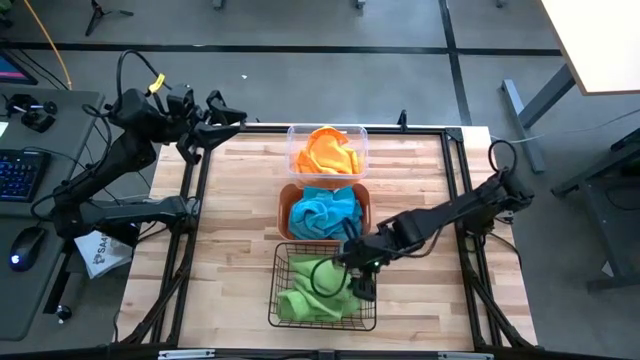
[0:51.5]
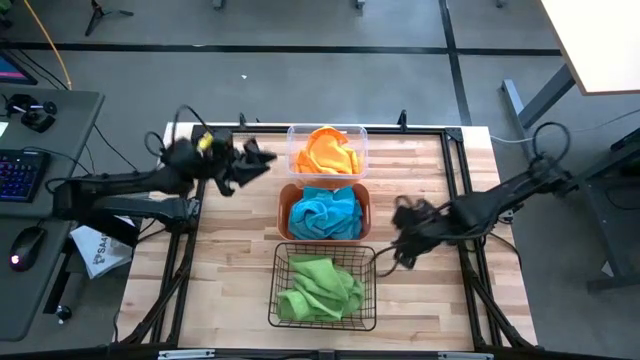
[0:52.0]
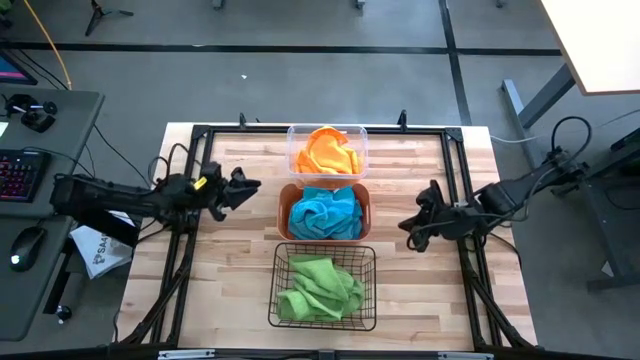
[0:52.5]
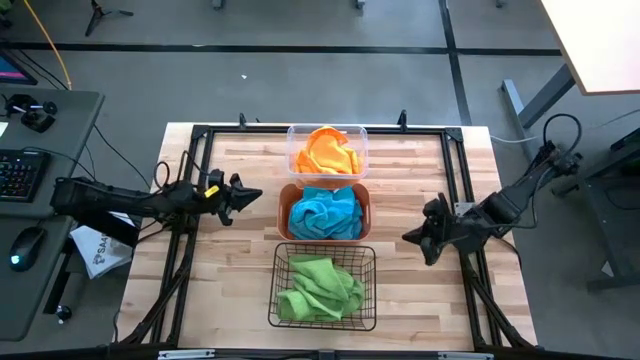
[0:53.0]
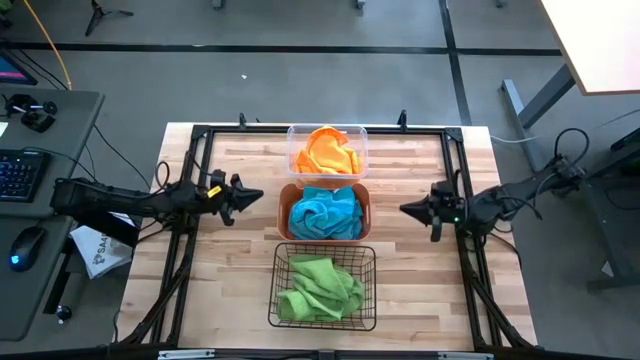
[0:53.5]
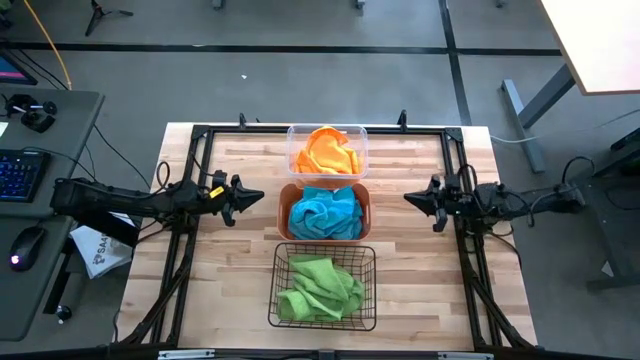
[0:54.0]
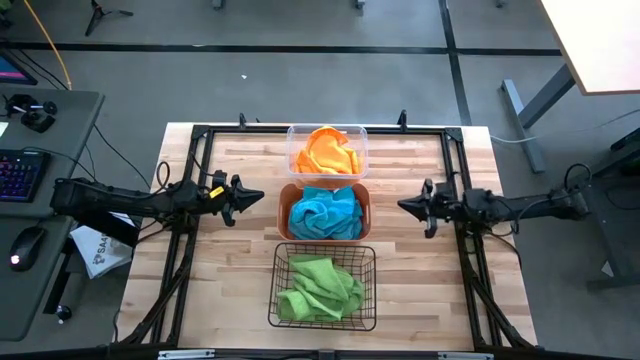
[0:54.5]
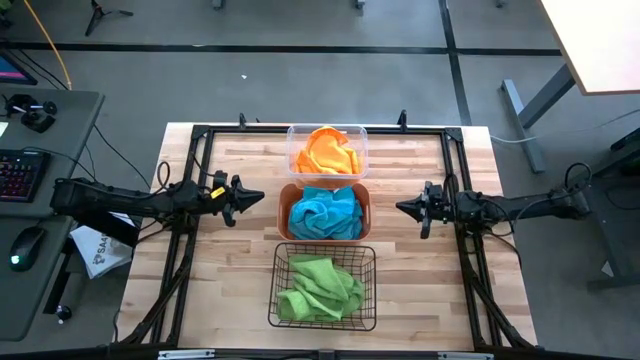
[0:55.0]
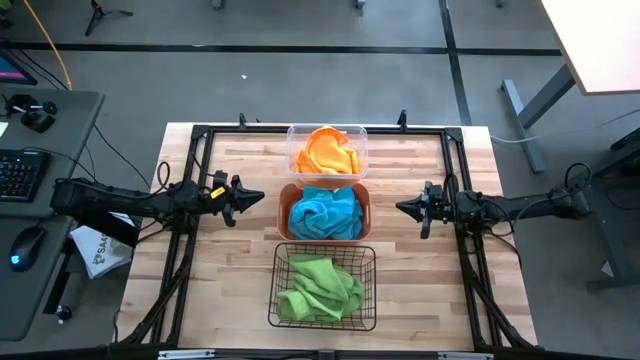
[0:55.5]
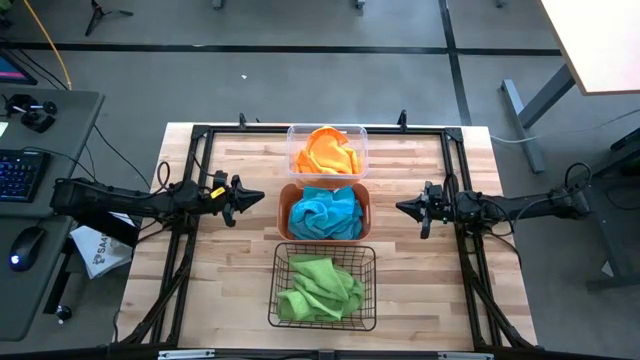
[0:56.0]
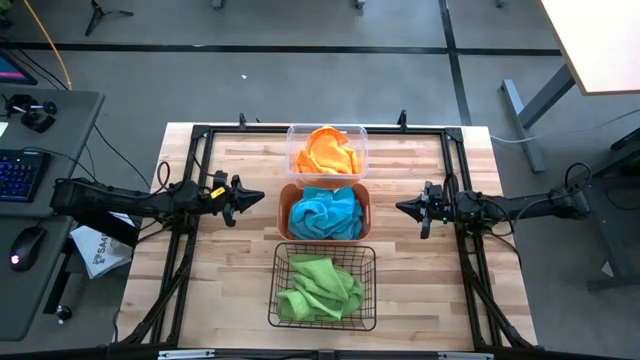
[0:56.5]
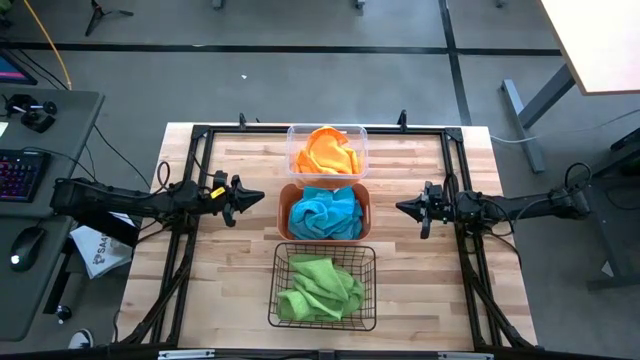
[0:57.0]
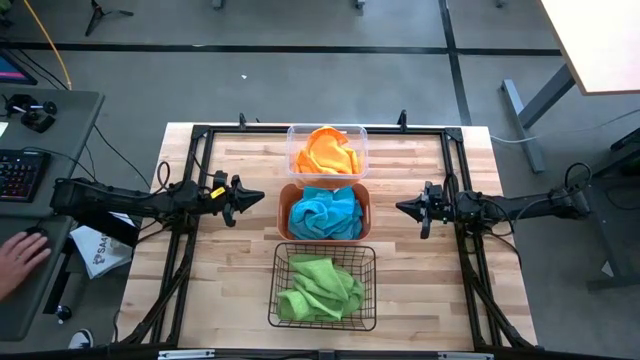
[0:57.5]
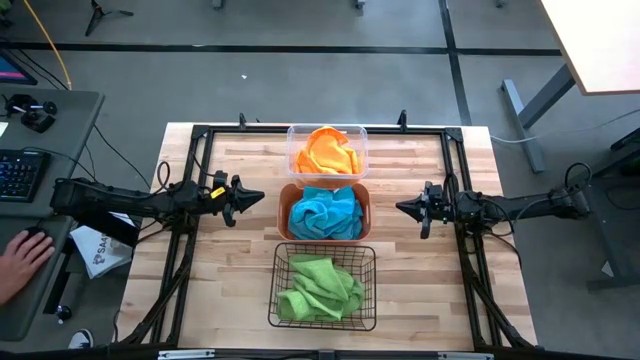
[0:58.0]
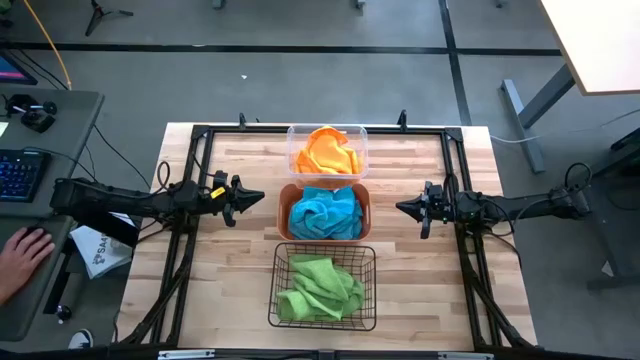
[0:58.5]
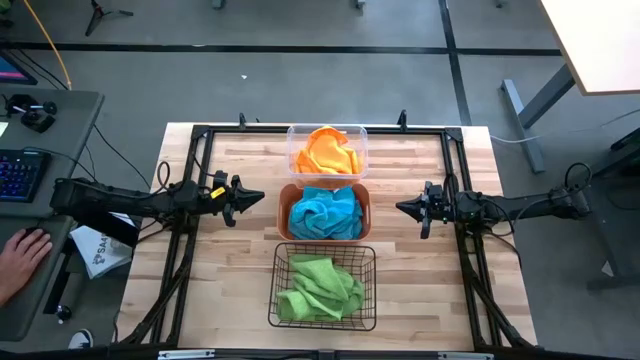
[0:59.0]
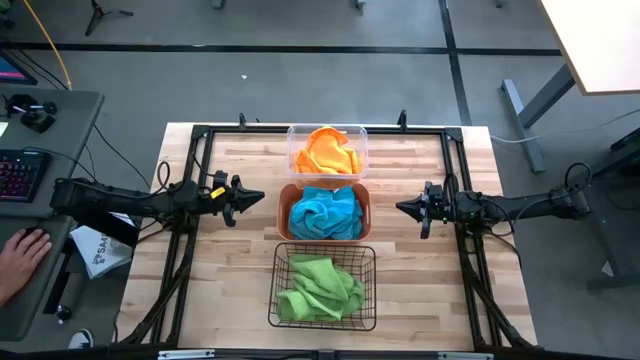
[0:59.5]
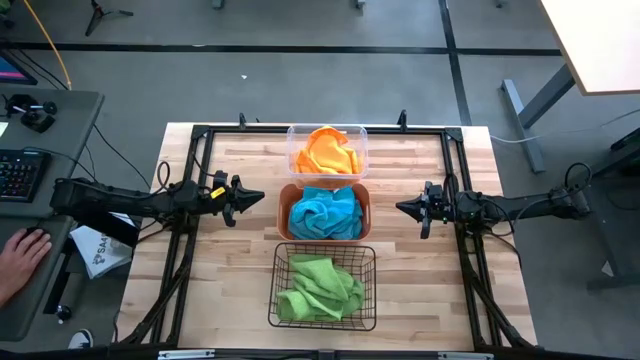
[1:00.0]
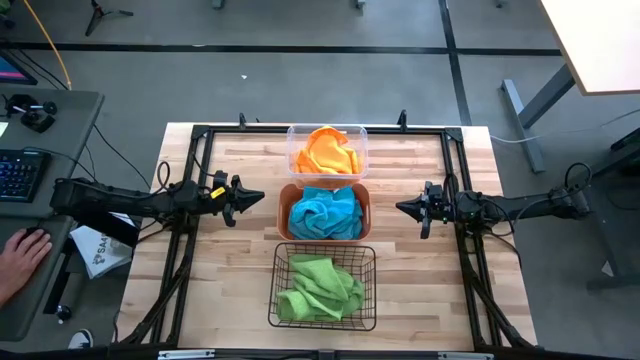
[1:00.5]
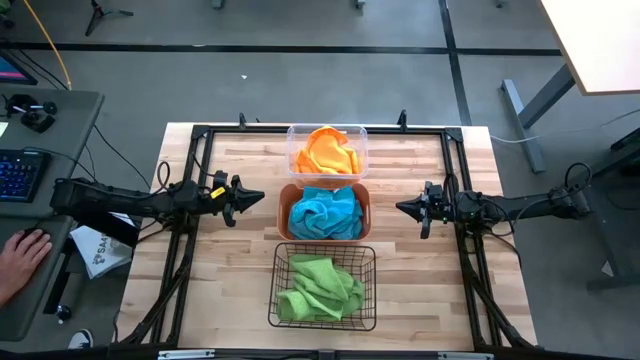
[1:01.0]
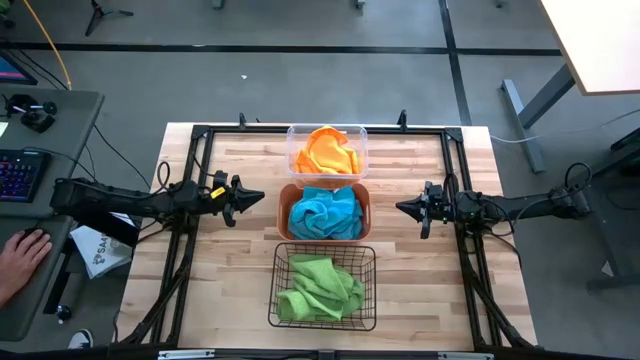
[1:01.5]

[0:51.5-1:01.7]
Task: Sort microfiber towel by color & place in baskets
Return to Home Position

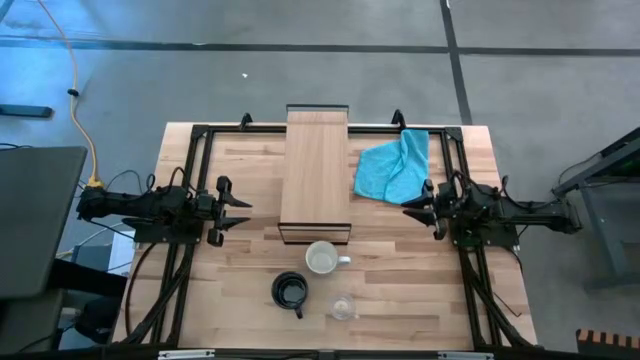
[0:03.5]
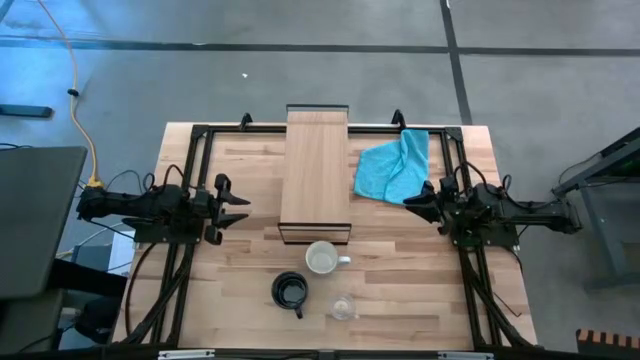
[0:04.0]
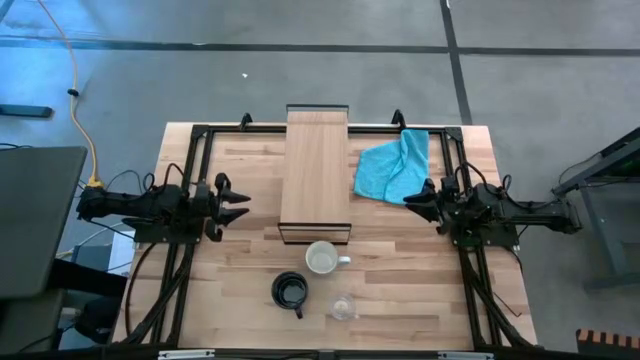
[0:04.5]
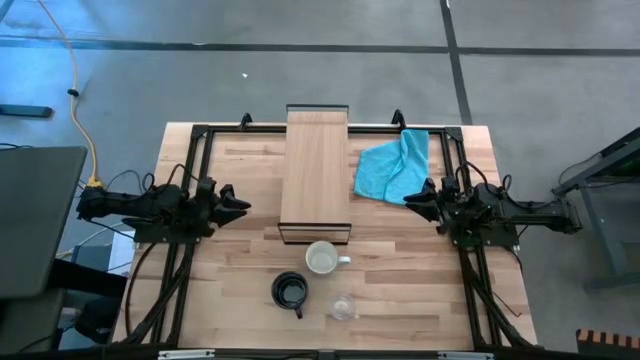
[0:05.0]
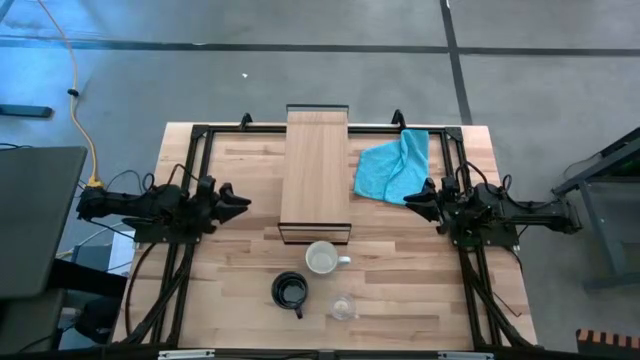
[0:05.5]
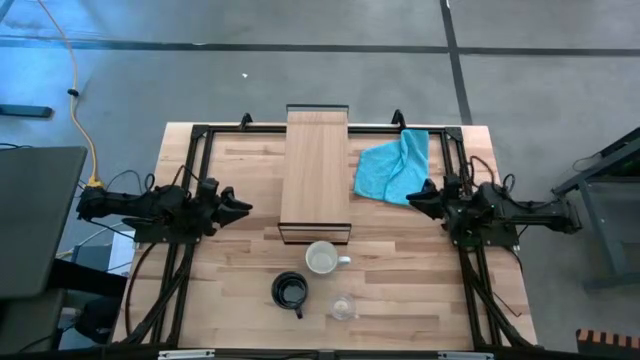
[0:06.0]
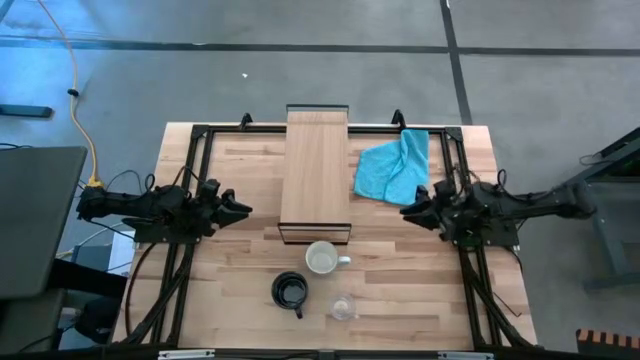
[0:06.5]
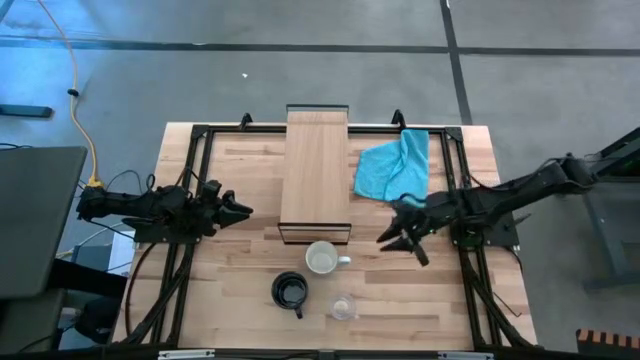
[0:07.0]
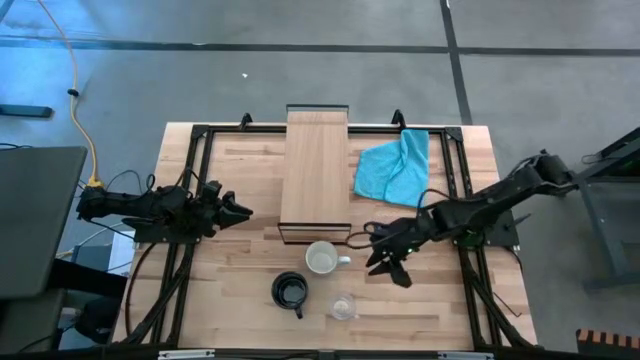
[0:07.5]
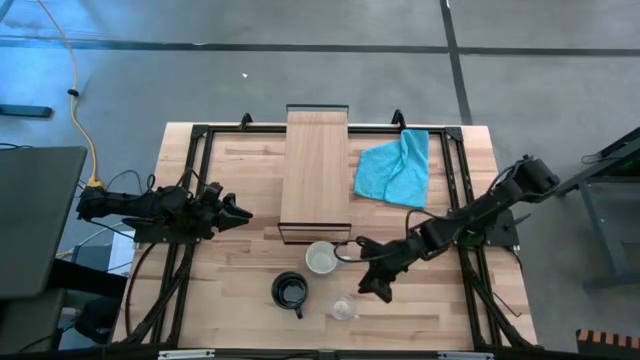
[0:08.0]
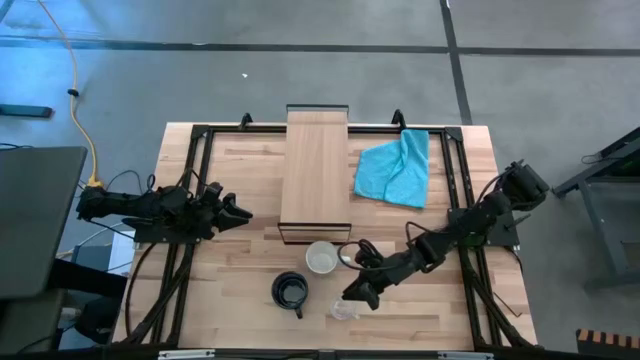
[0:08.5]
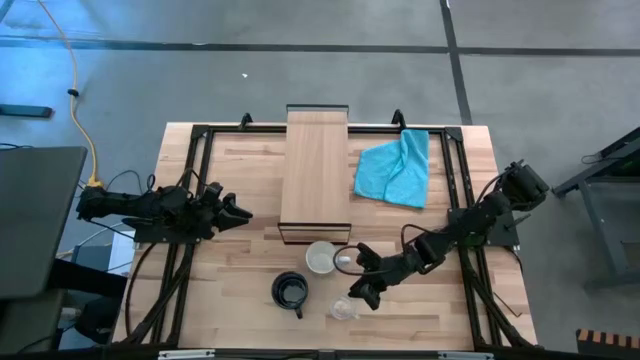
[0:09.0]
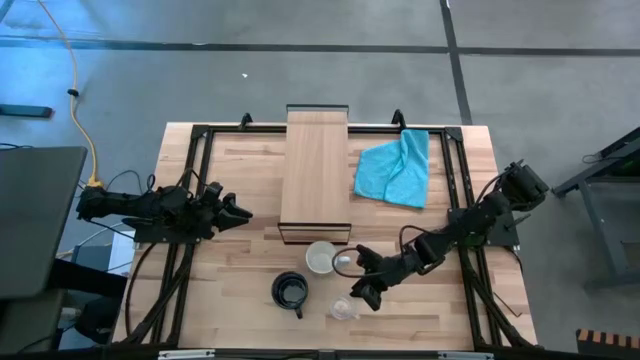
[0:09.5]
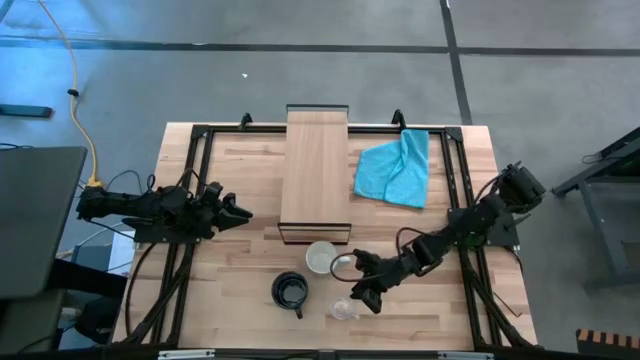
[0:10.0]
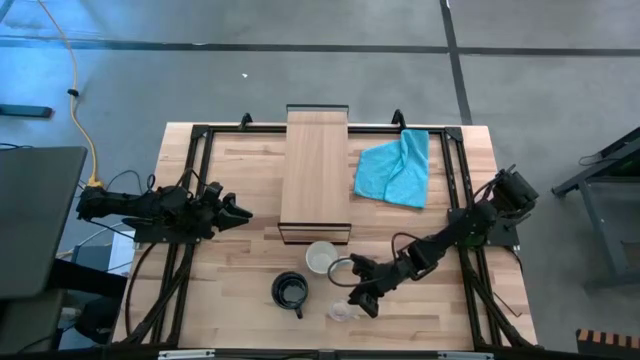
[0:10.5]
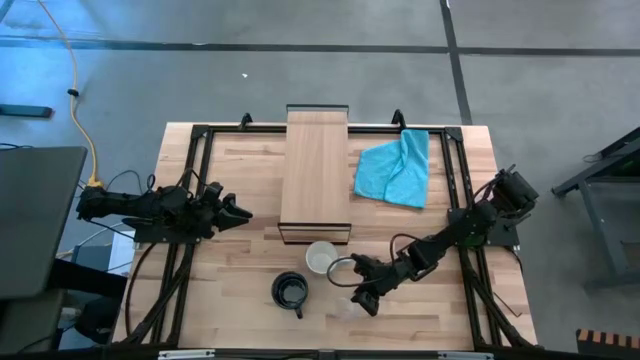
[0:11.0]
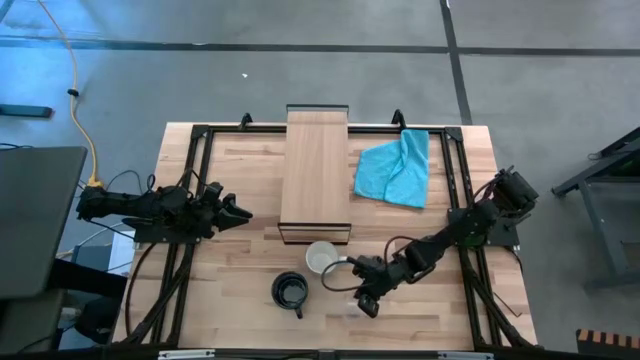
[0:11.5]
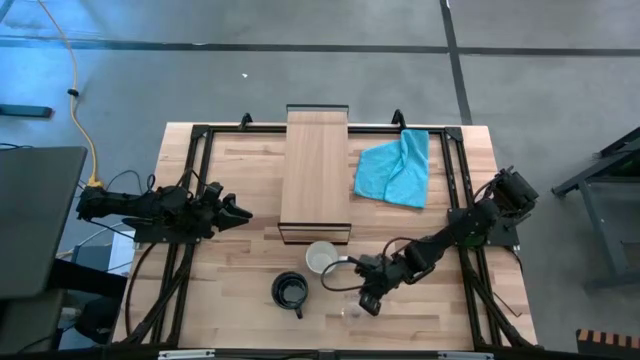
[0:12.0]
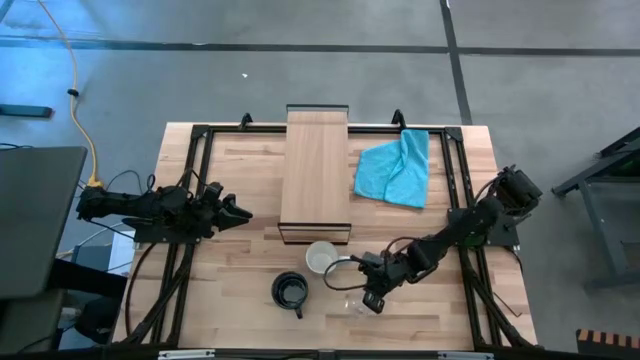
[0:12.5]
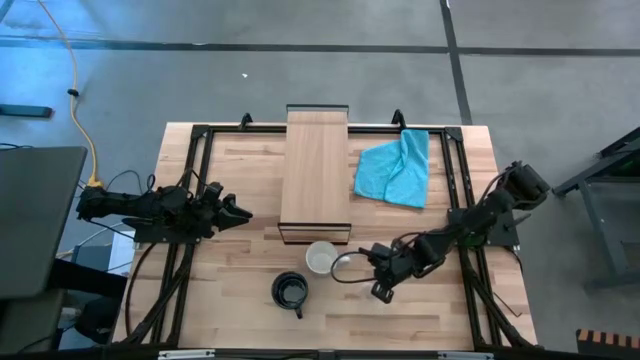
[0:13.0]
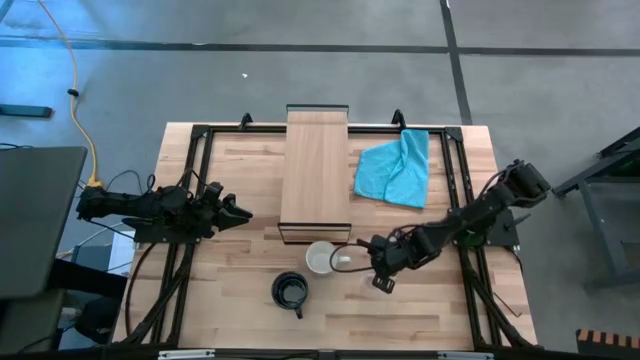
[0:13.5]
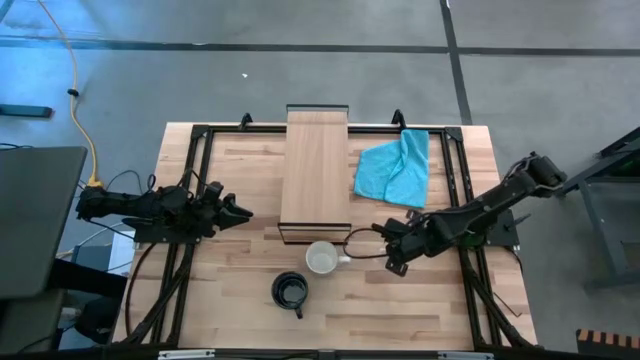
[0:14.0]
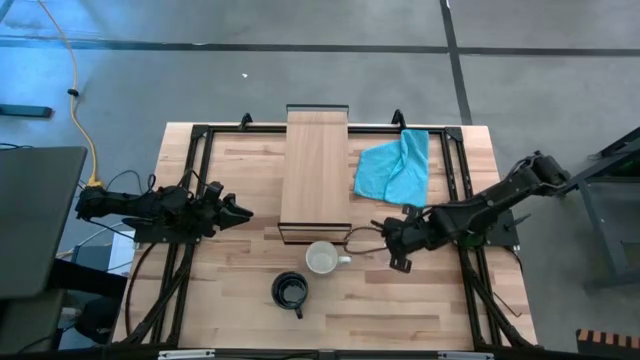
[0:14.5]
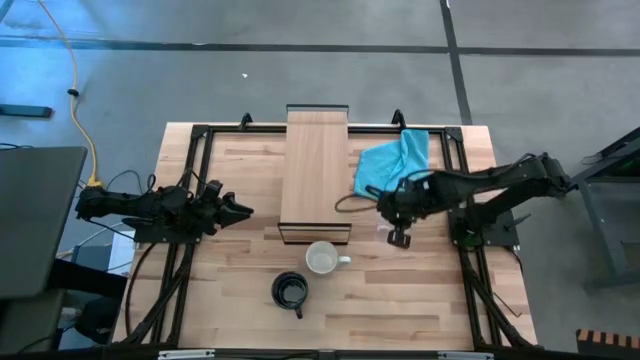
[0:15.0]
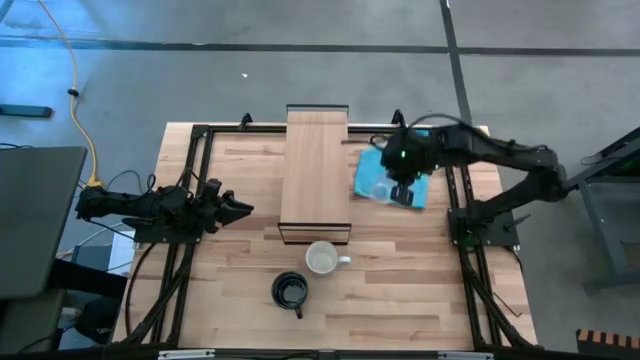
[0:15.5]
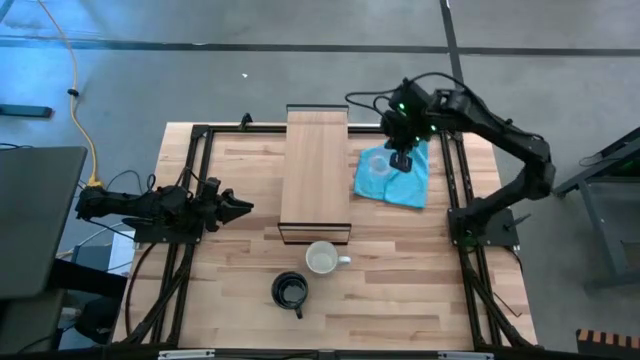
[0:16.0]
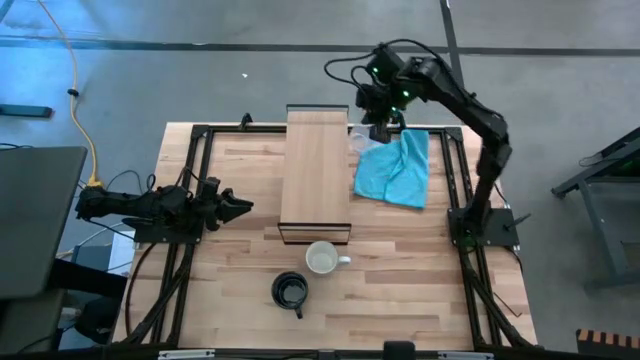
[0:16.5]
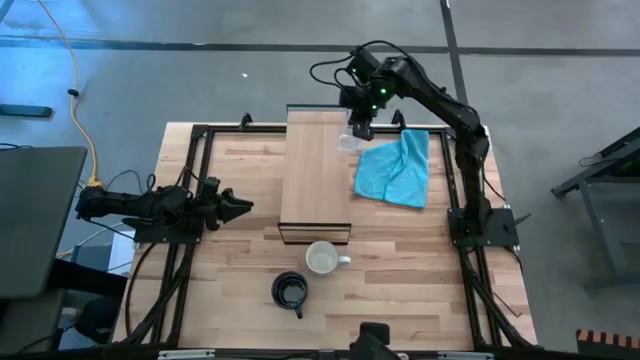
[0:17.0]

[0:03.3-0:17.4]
Task: Stack small to large cups/mugs on shelf
Put the transparent mug on the shelf
